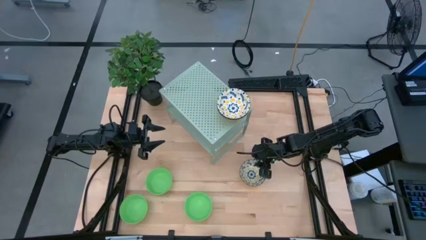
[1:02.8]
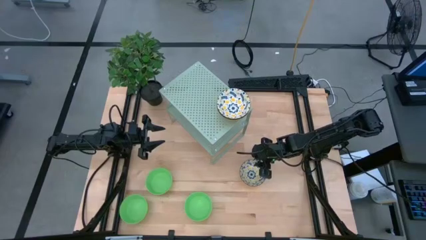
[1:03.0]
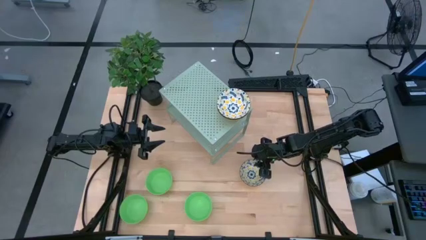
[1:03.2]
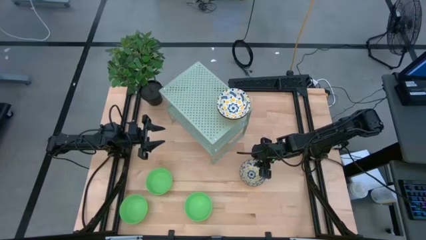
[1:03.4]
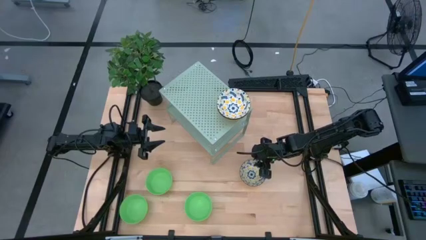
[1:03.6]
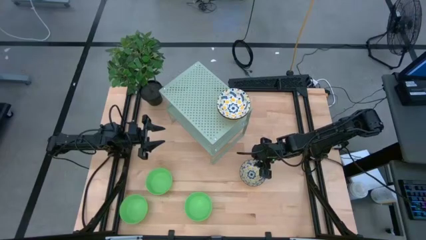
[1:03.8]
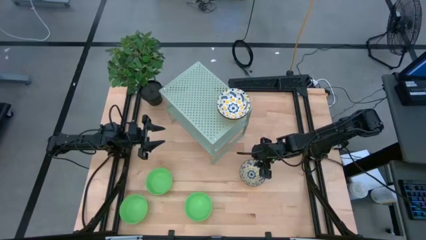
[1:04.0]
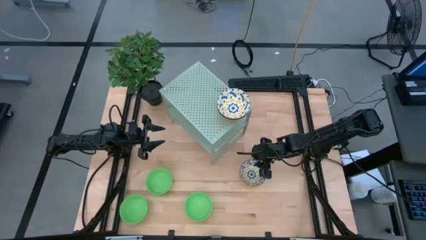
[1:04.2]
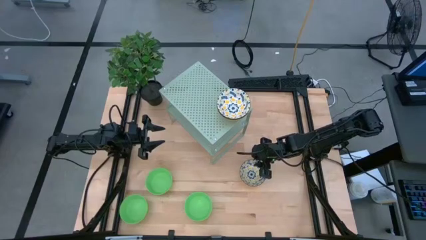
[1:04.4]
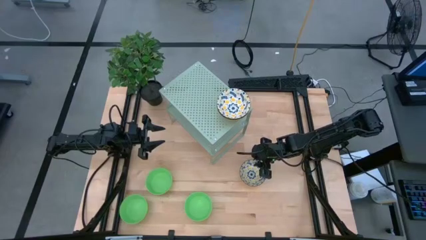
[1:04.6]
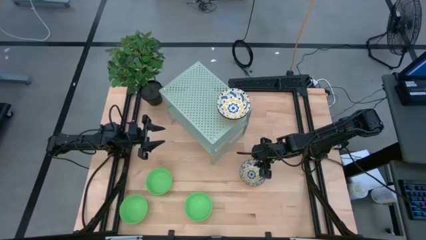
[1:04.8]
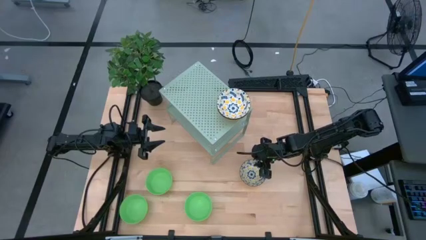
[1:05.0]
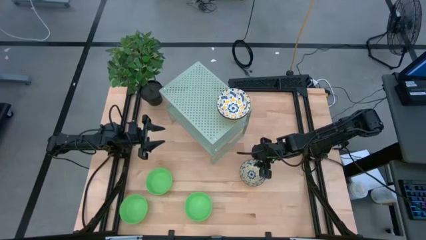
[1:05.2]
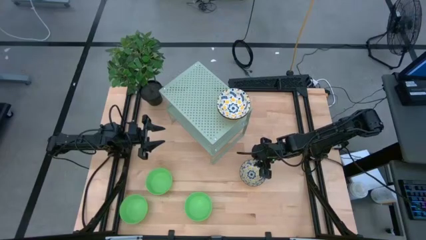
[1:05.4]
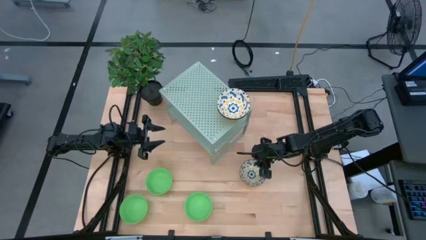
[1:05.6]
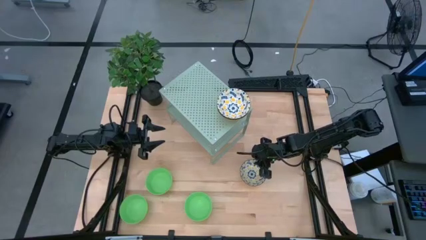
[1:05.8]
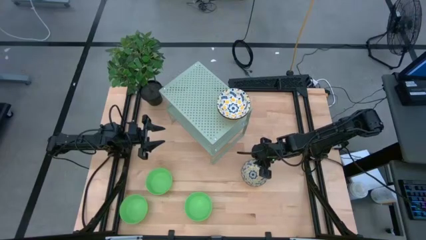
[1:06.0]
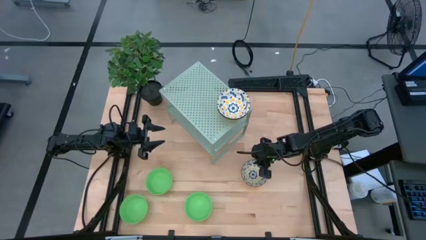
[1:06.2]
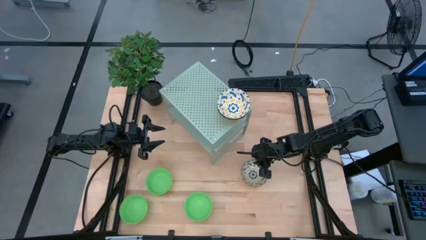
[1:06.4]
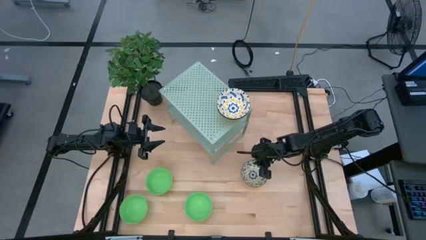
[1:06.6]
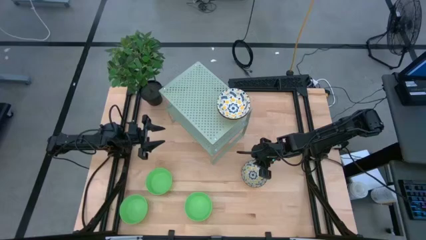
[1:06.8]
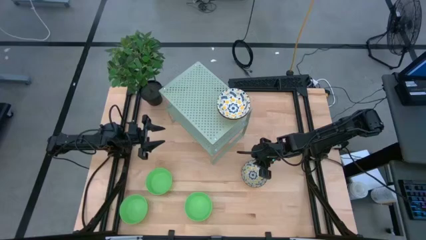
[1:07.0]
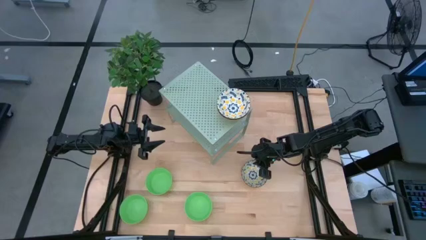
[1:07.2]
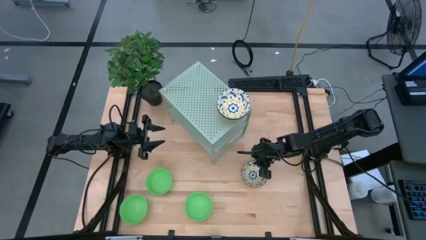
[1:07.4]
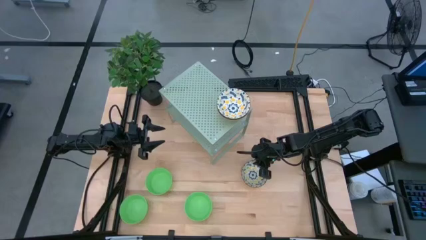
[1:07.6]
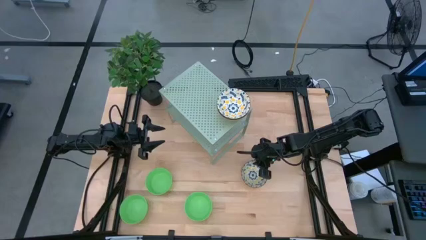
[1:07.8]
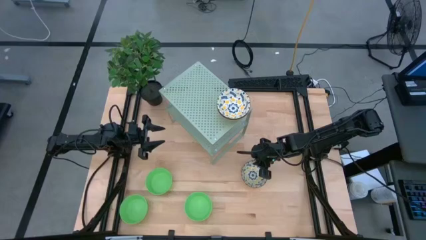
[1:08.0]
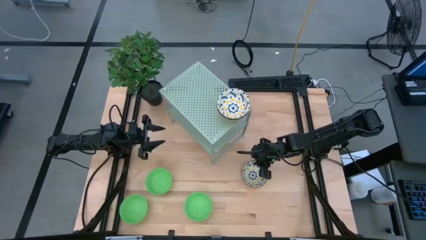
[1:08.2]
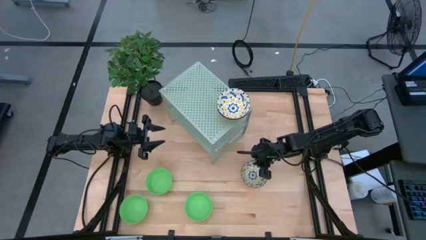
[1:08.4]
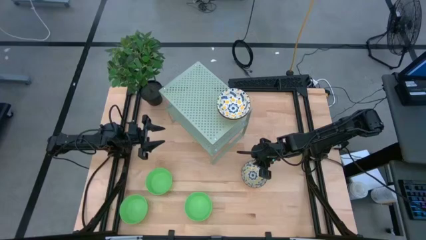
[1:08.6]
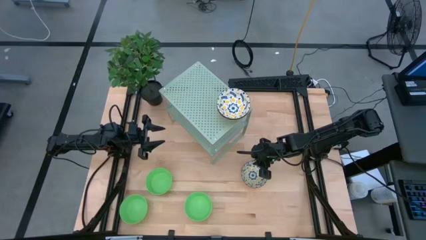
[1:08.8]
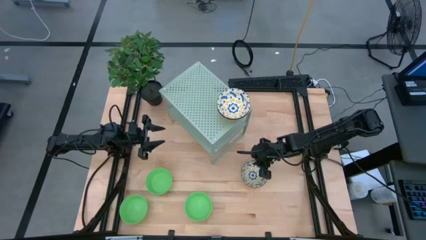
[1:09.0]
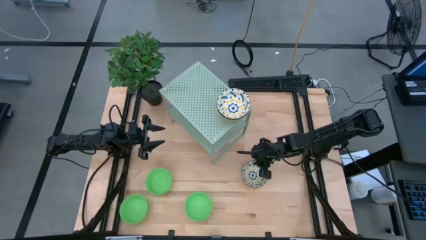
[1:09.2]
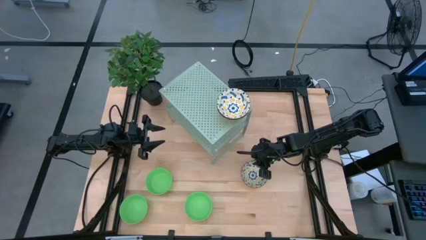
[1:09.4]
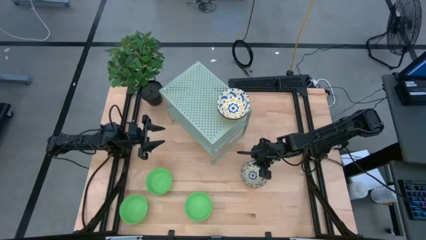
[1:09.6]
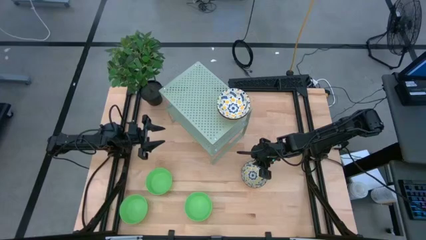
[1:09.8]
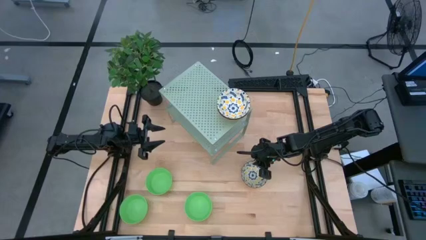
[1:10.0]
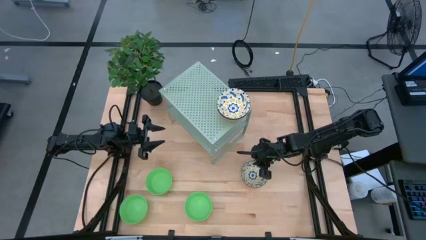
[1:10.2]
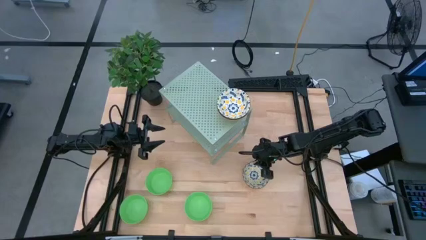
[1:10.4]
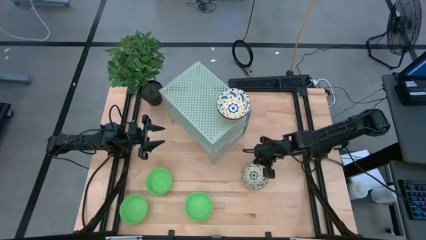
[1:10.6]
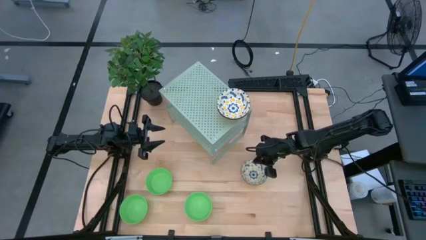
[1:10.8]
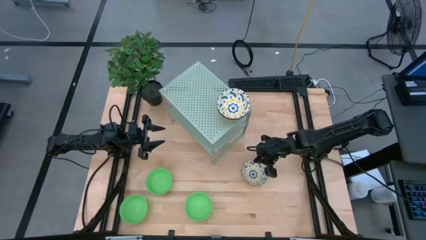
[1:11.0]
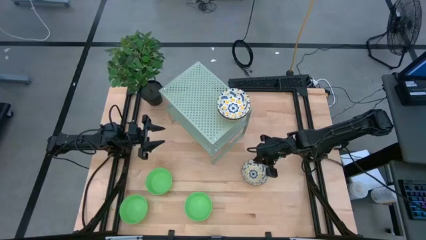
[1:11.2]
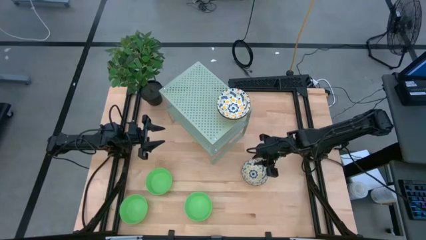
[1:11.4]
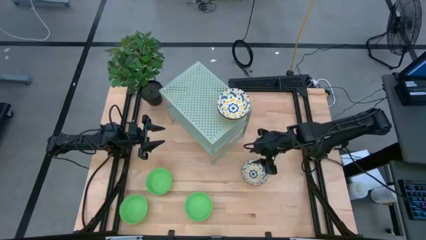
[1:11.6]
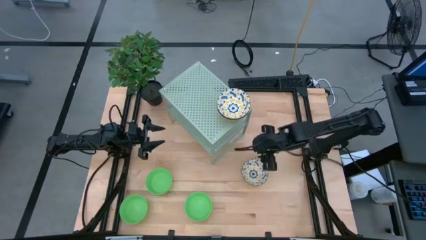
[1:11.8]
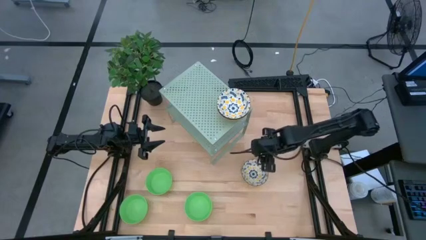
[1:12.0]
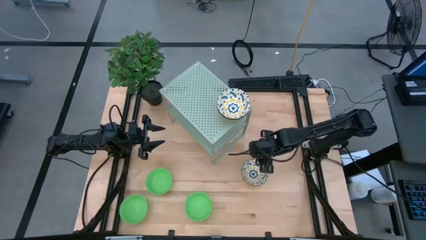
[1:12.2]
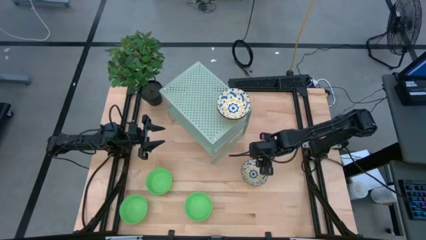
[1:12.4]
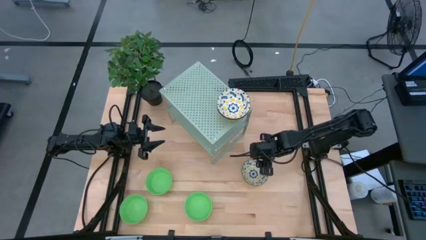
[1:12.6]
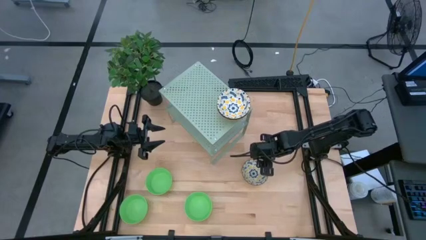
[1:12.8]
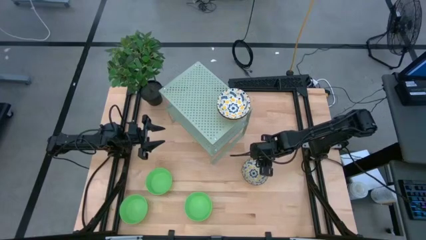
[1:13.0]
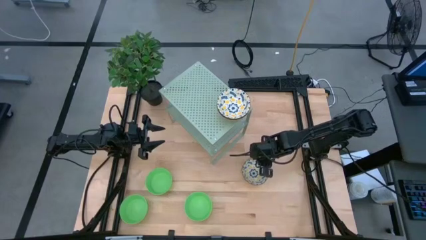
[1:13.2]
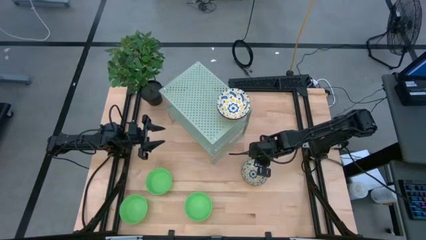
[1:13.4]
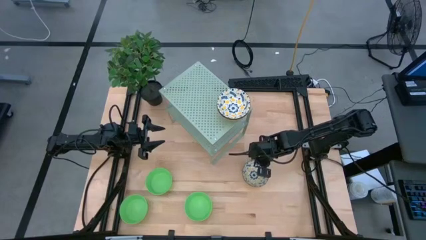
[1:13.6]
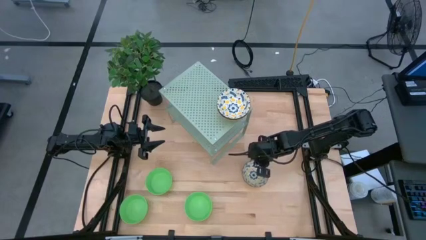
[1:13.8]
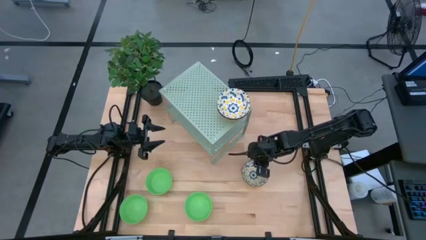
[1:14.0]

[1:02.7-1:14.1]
Task: Pick & Place Mini bowls
Stack the yellow patterned bowl on the yellow patterned bowl on the shelf

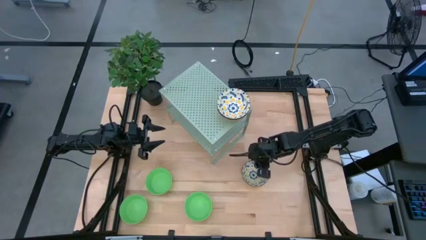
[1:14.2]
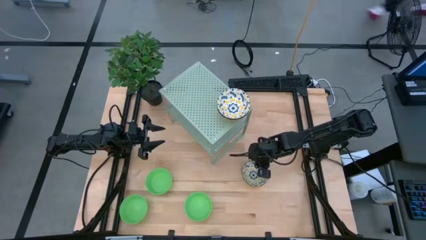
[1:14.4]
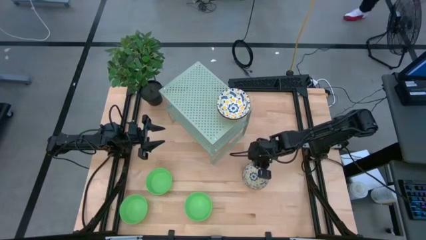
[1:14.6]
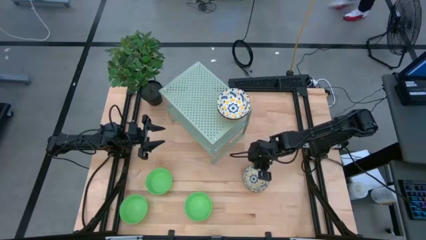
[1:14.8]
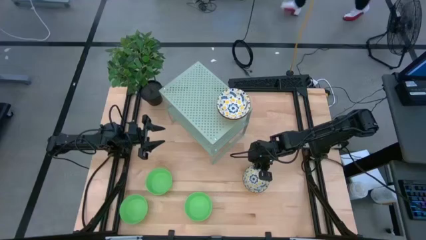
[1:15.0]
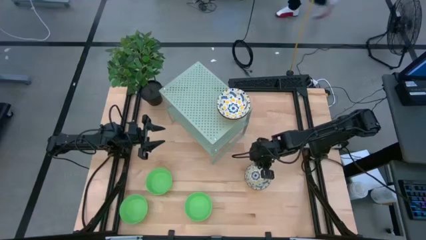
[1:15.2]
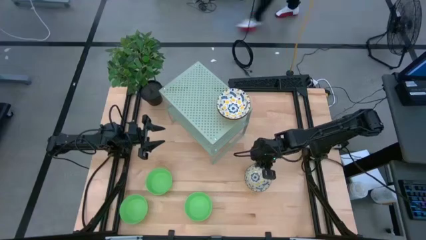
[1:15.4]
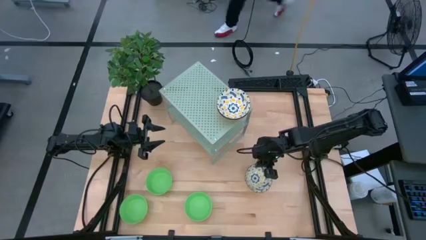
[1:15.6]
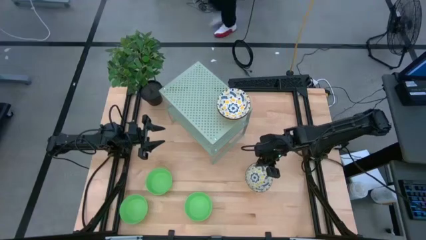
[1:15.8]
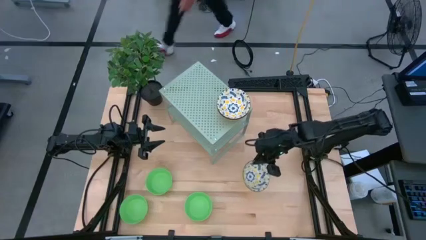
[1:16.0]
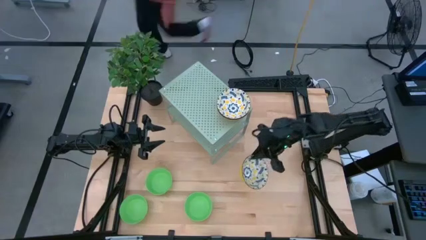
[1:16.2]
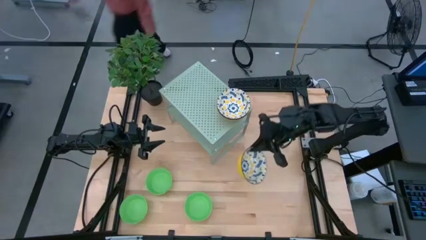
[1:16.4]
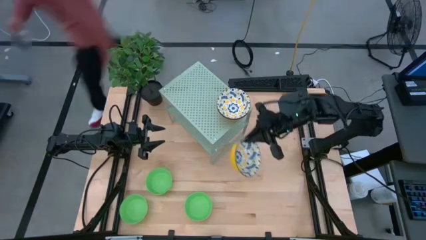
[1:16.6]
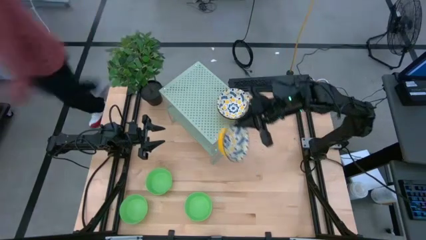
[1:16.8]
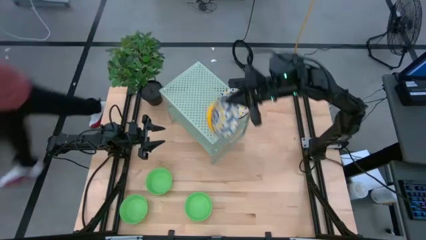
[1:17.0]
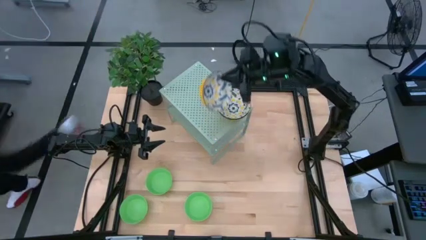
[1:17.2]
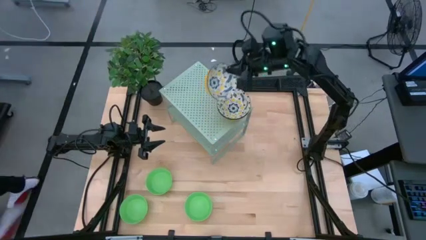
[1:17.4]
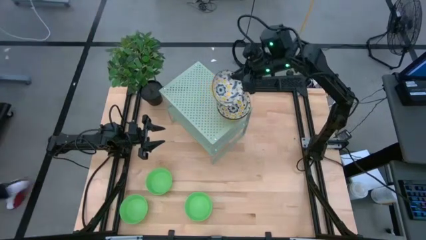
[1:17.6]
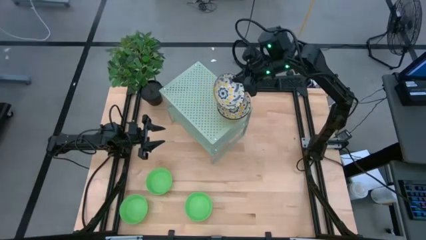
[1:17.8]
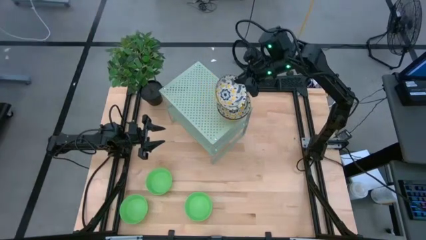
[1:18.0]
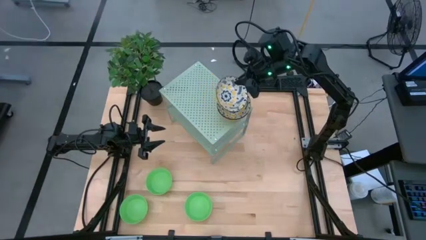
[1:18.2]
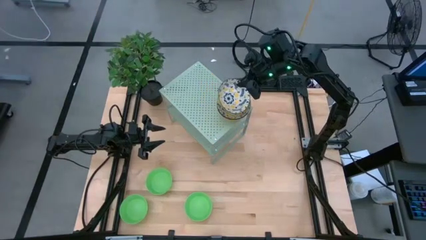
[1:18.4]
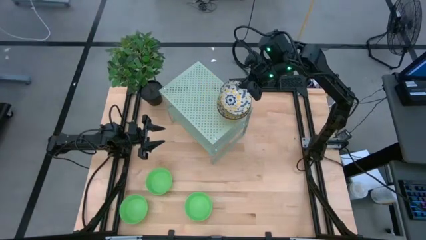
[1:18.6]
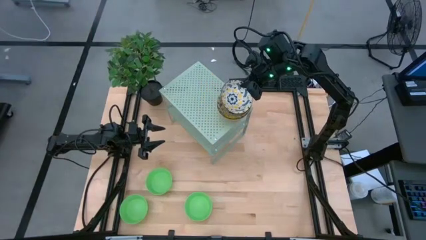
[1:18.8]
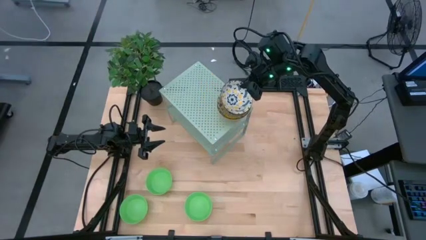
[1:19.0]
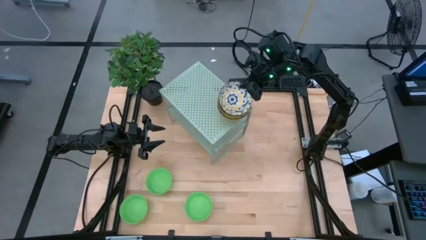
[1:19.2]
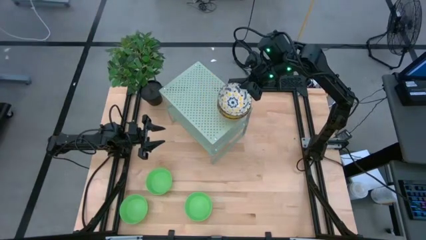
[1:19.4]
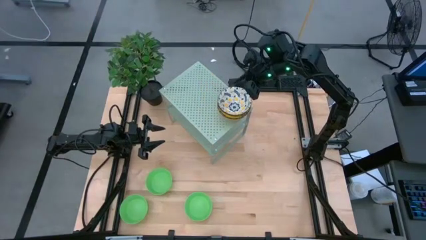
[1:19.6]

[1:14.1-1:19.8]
Stack the yellow patterned bowl on the yellow patterned bowl on the shelf
